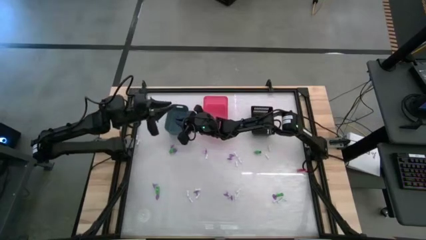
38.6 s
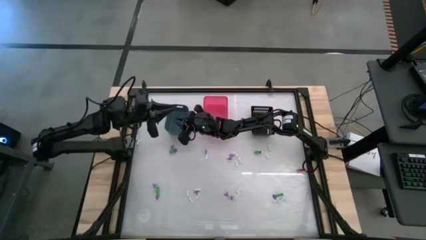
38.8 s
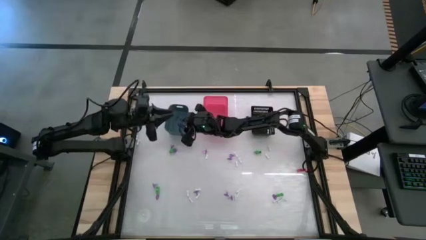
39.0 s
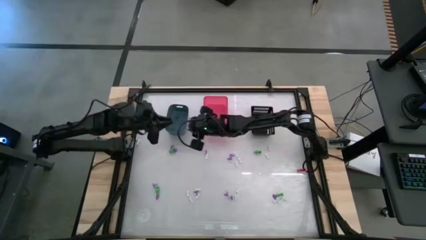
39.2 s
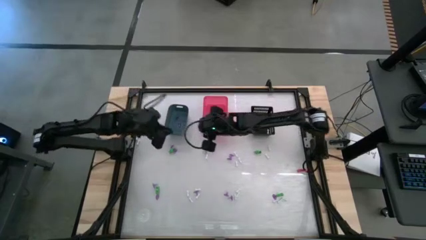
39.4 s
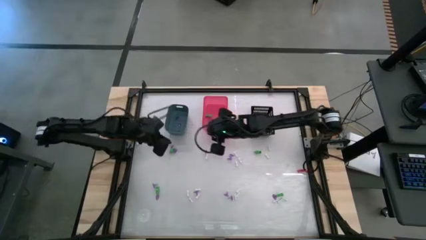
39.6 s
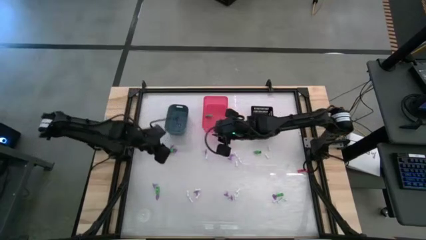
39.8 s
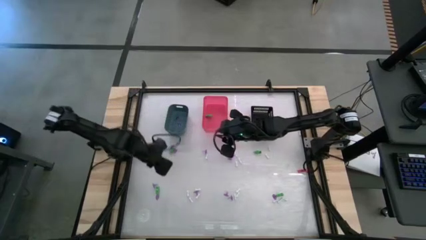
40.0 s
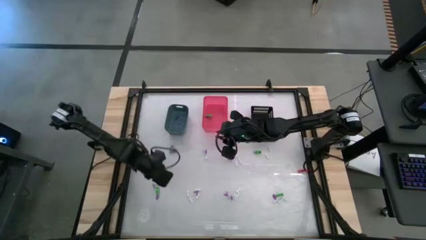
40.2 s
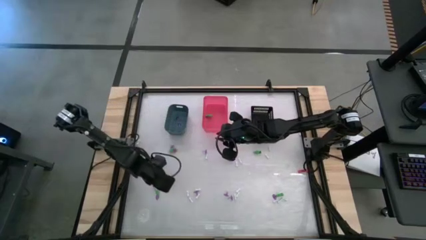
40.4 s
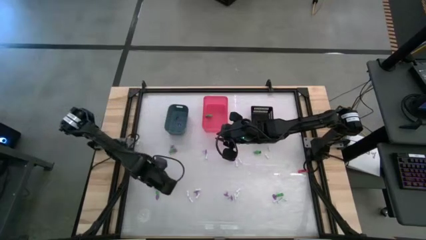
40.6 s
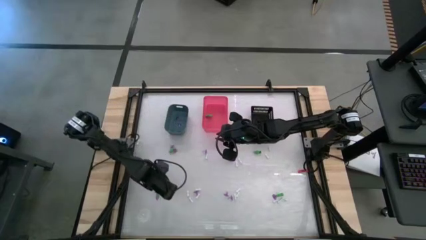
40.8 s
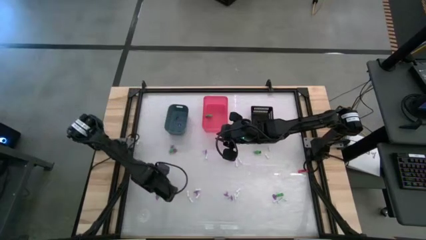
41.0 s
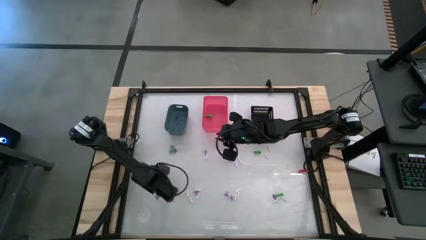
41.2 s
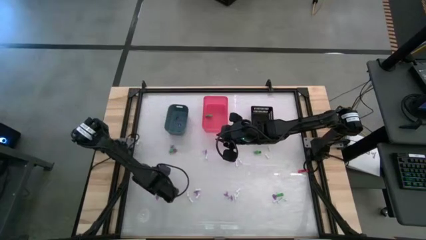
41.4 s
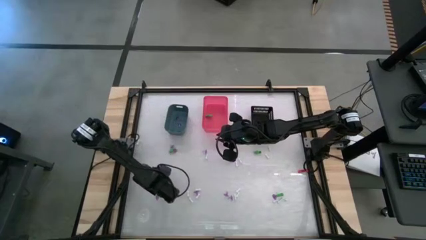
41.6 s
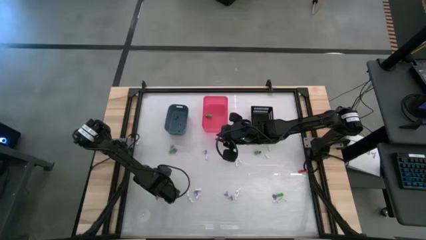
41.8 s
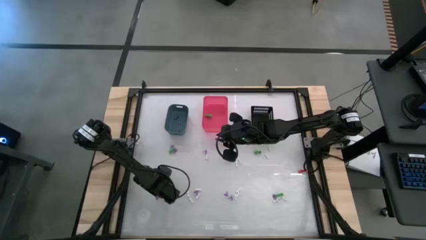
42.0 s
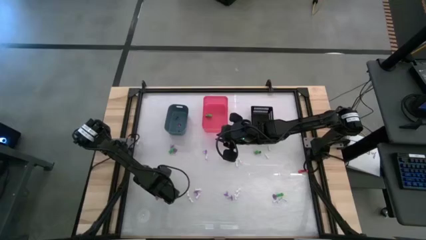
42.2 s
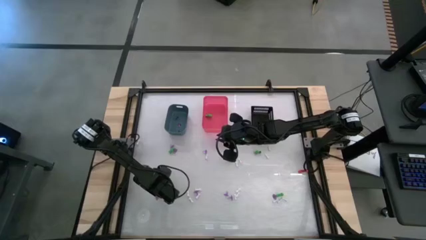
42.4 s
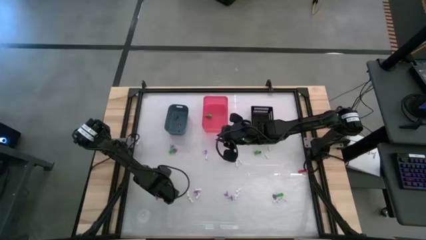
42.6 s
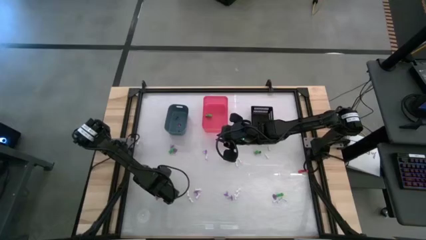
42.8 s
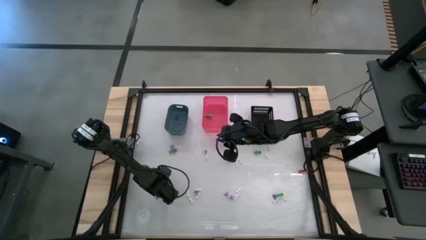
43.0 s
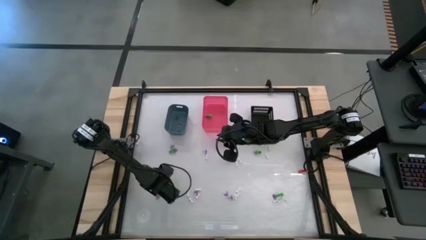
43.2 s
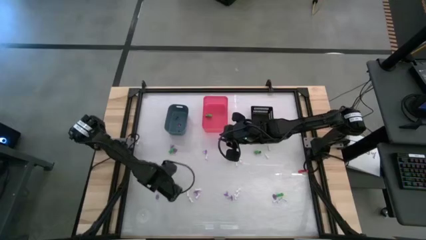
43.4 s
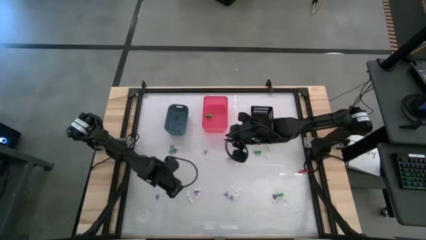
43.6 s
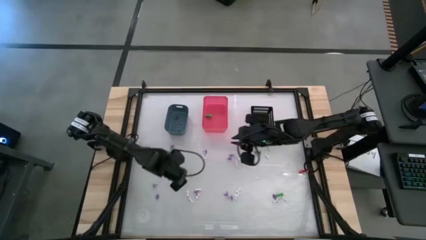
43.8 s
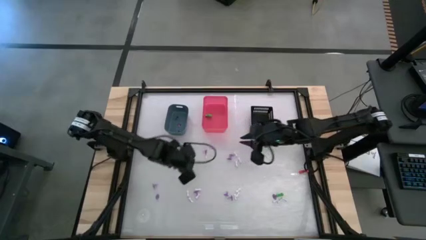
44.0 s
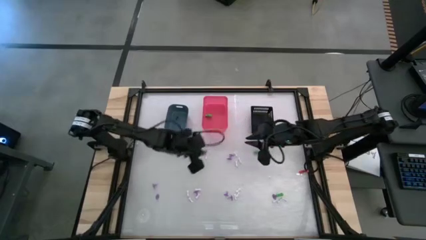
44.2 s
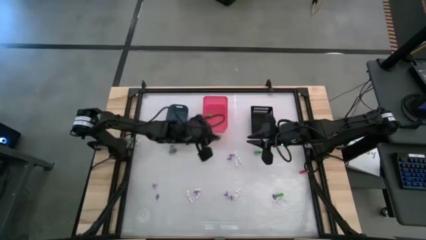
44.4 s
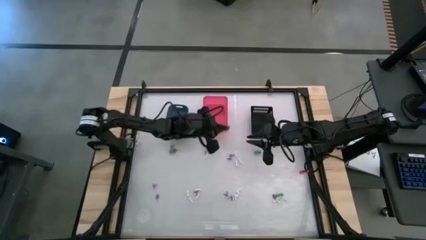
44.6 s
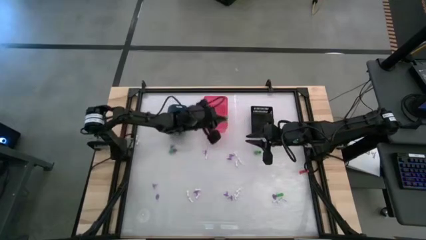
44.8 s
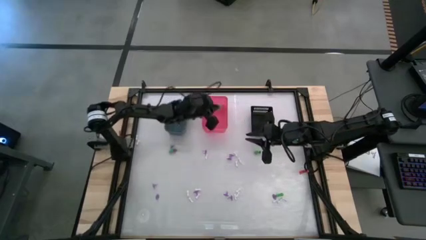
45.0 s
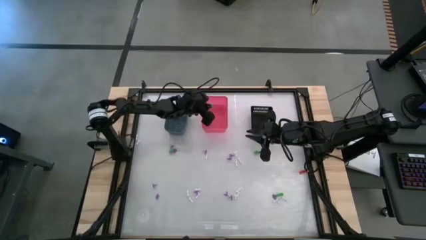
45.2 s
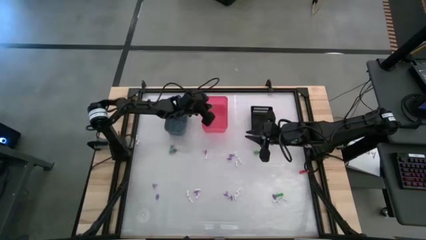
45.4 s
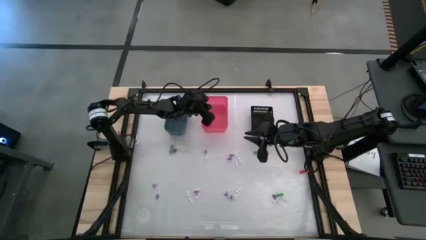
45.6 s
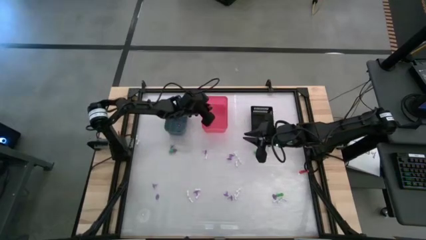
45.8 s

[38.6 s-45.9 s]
Task: Sort Halloween decoration
Put the green skeleton toy into the pink bin

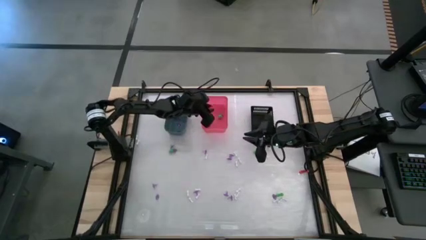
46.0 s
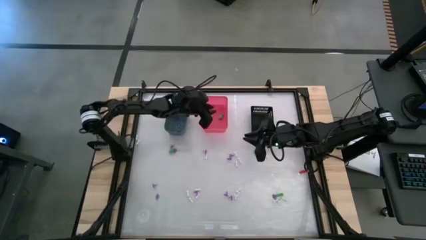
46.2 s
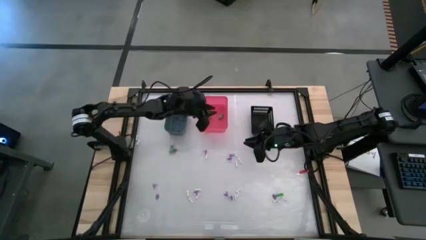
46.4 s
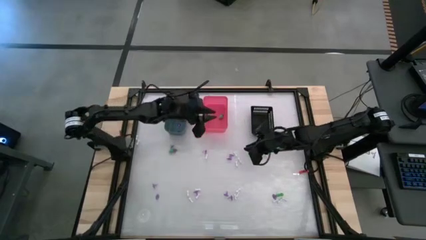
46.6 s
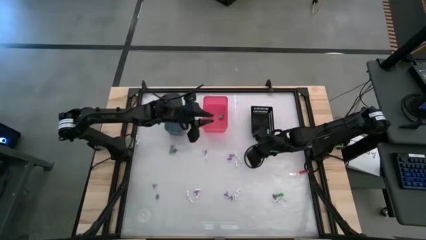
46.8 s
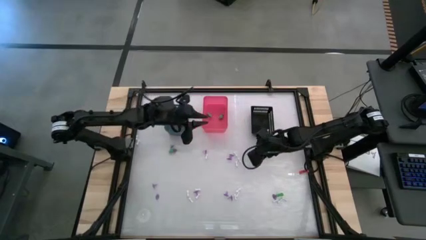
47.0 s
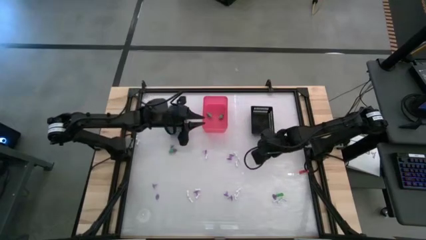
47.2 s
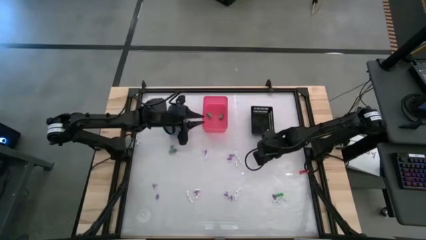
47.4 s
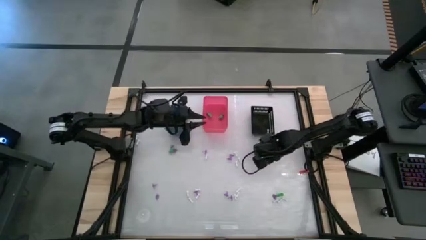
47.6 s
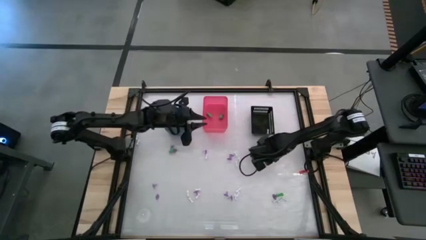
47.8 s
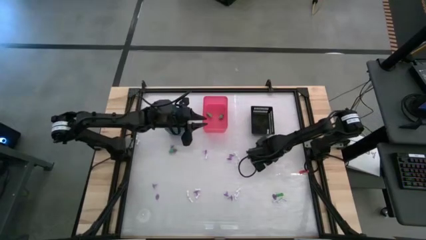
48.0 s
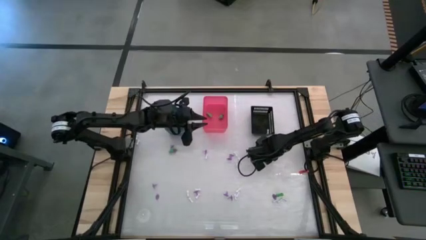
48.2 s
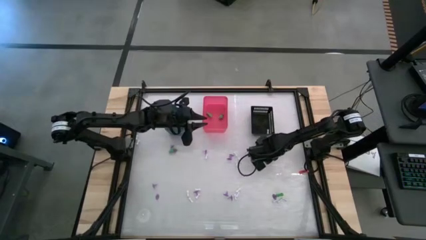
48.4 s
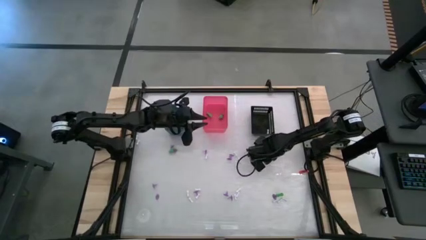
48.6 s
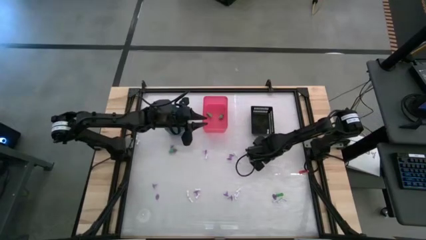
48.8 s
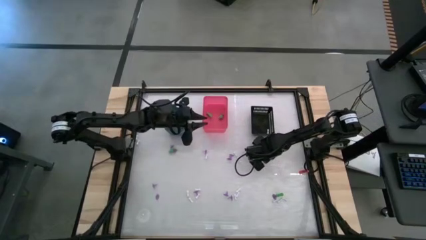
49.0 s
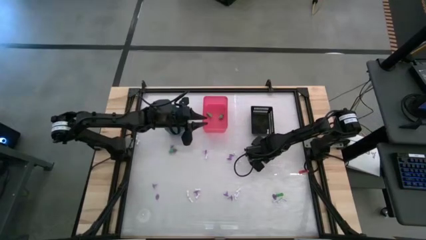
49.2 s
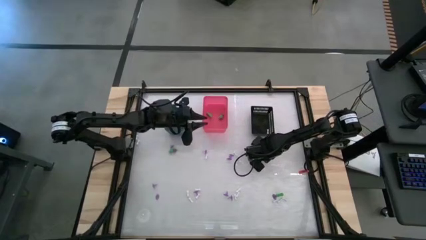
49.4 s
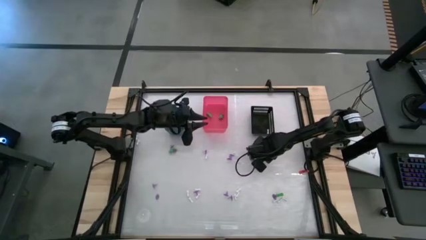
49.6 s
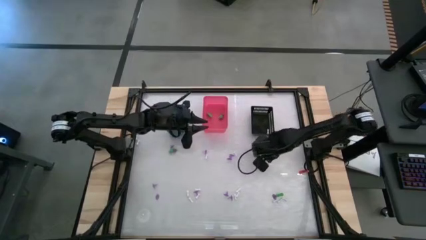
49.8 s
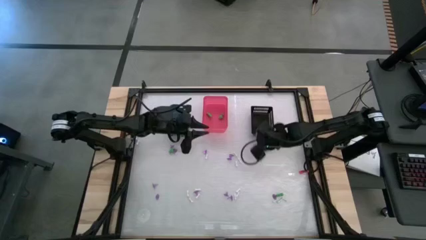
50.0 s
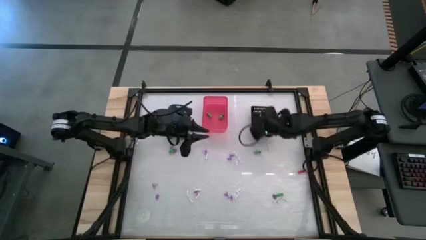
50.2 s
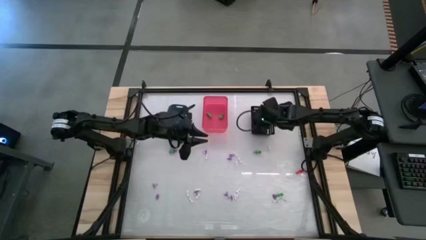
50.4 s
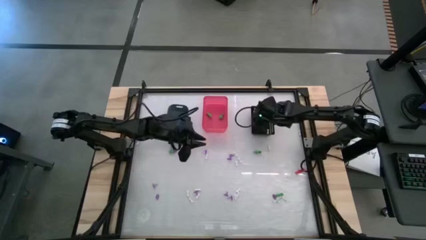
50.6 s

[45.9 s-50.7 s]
Put the white bone toy into the black bin

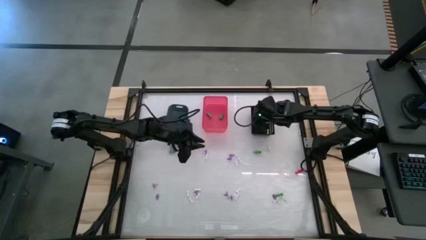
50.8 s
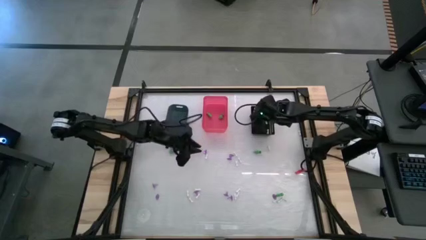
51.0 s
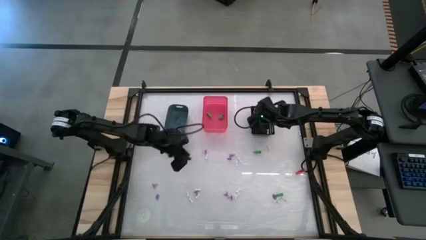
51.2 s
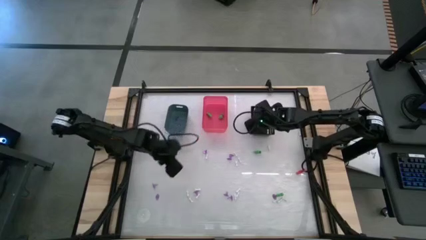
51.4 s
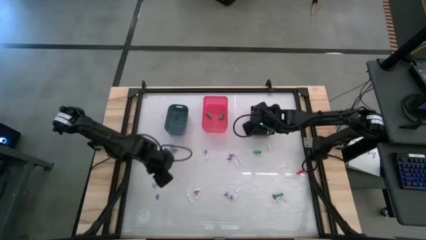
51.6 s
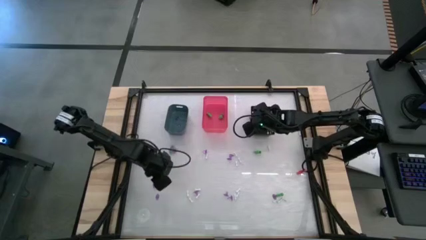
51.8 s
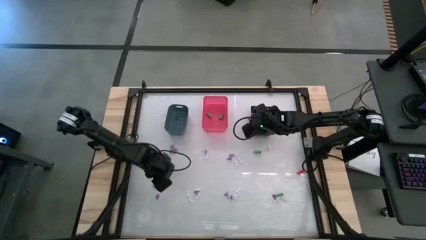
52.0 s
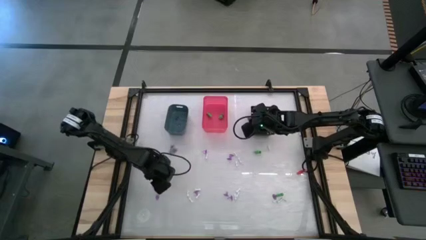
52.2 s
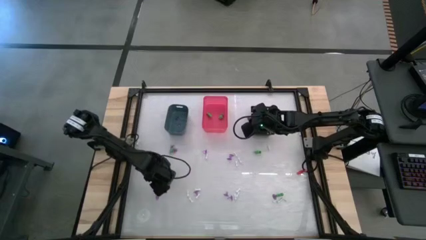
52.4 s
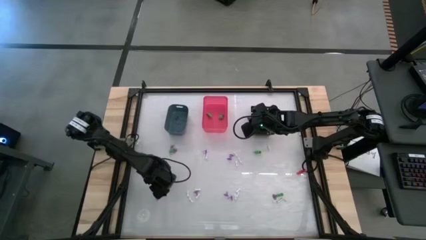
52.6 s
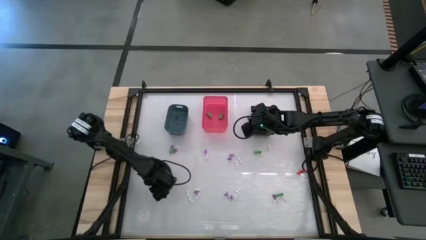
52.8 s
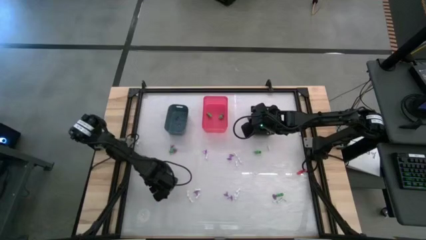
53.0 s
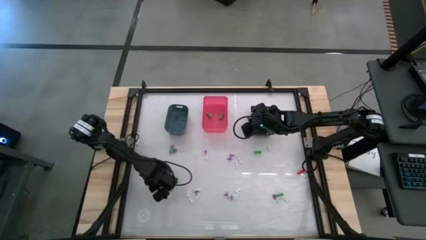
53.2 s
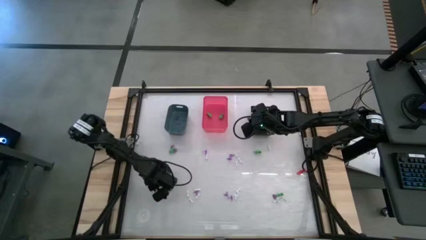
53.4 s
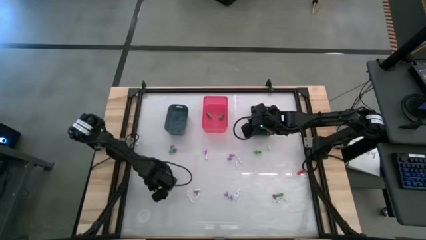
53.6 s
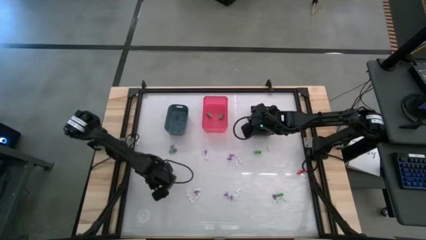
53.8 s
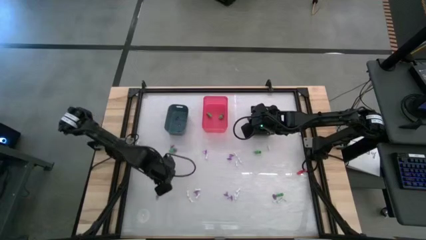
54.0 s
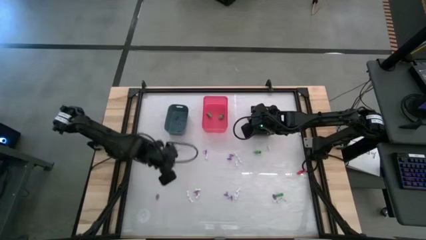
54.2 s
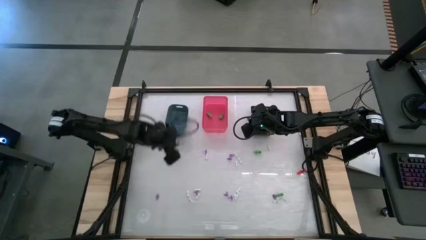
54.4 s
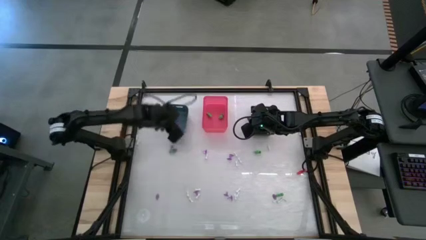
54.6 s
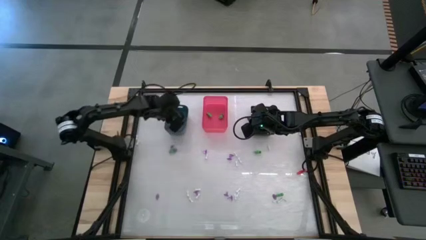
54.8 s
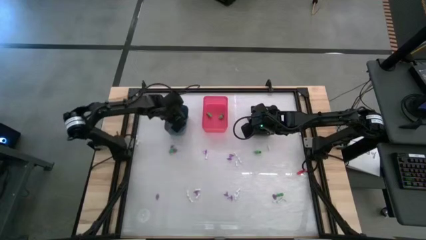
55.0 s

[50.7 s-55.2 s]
Put the purple witch hat toy into the blue bin

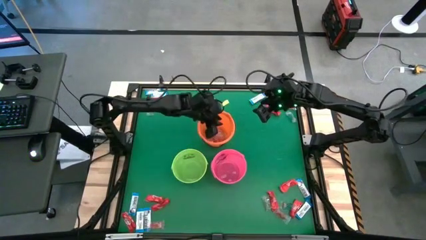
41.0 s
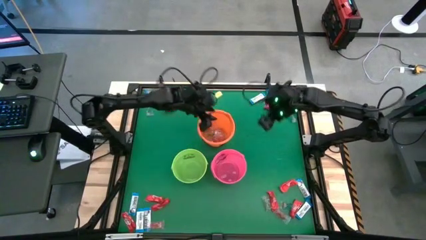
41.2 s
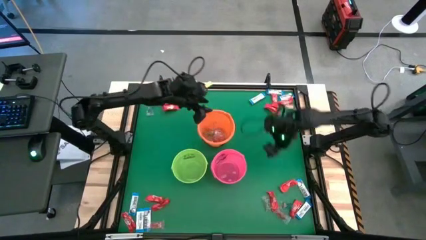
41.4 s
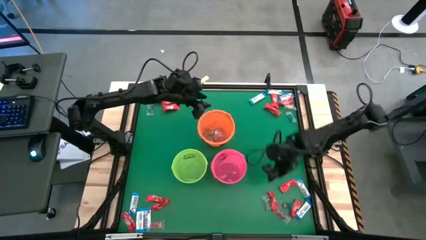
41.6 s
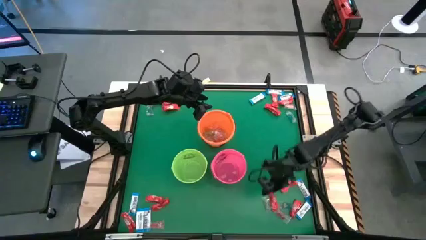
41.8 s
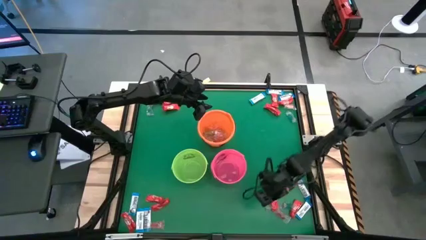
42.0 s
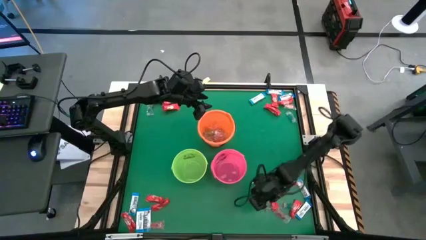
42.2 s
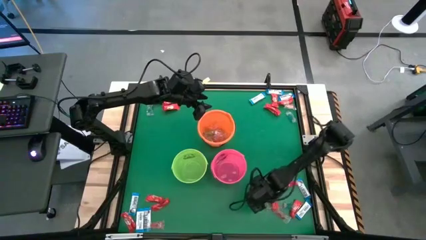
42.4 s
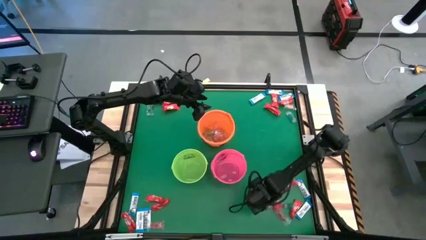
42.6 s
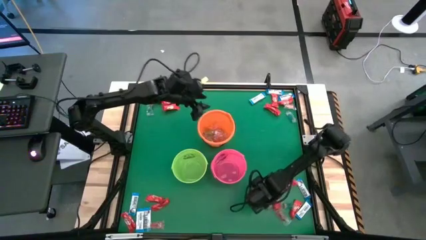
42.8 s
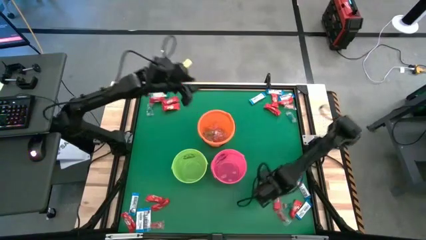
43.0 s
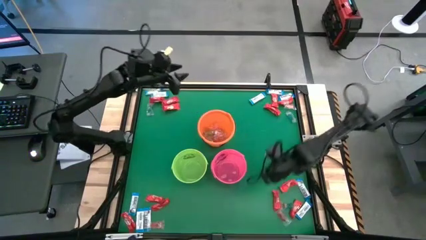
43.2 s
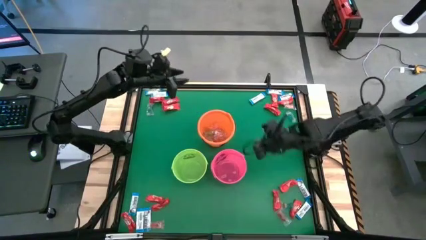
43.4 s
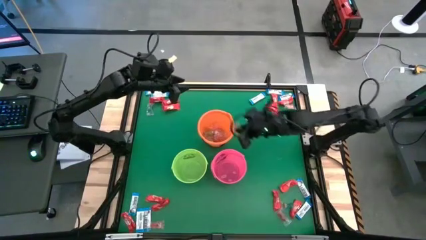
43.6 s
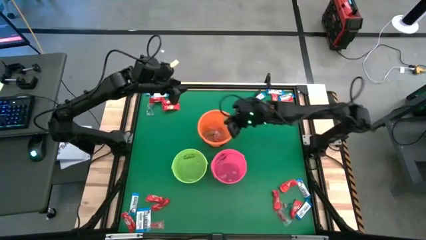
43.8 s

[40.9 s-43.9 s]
Task: Sort candy by brand, put in halloween buckets
Put the green gummy into the orange bucket
